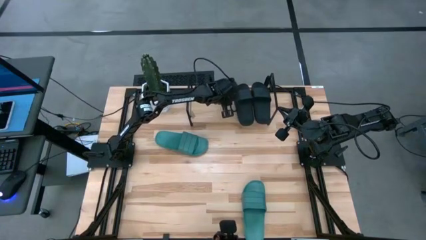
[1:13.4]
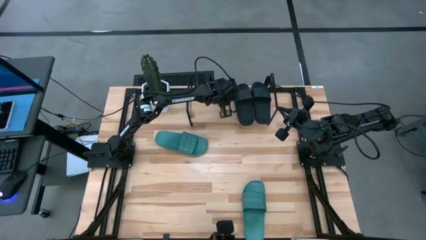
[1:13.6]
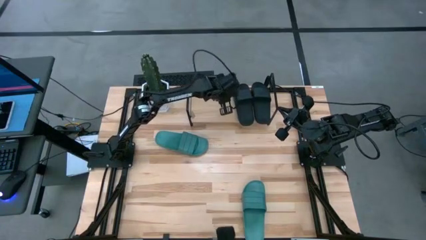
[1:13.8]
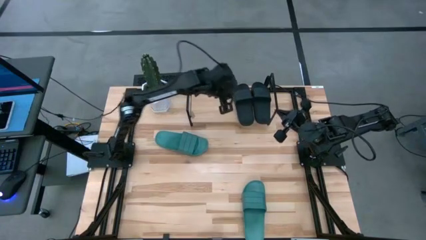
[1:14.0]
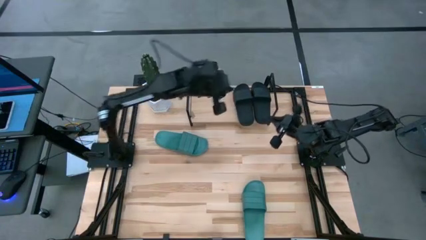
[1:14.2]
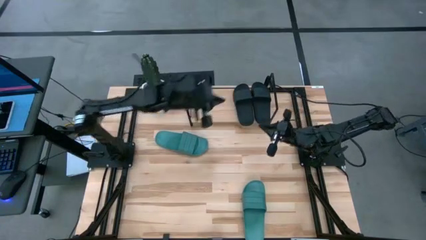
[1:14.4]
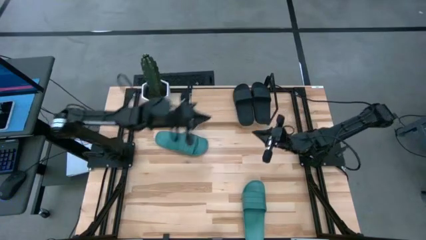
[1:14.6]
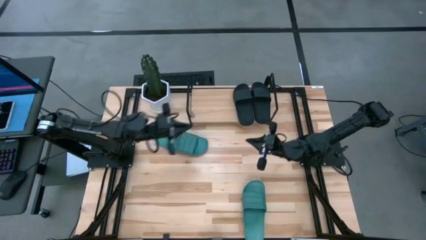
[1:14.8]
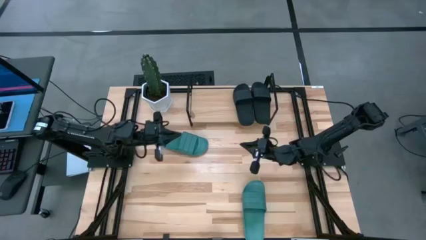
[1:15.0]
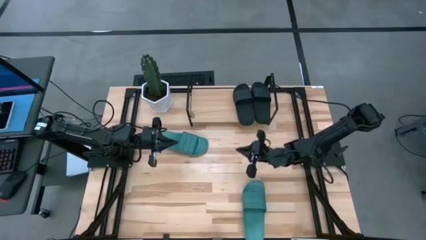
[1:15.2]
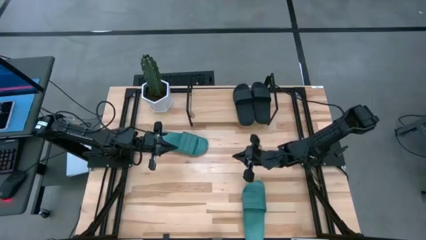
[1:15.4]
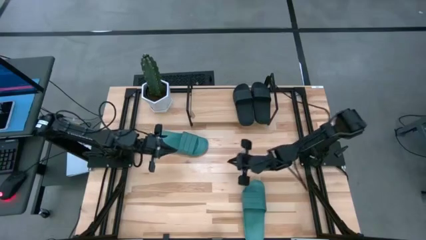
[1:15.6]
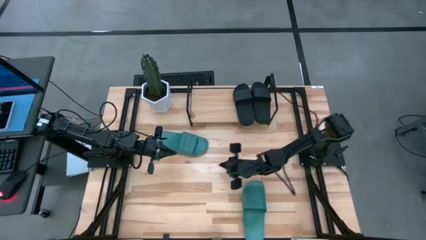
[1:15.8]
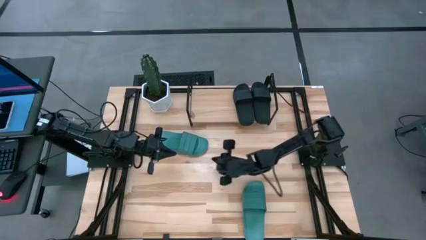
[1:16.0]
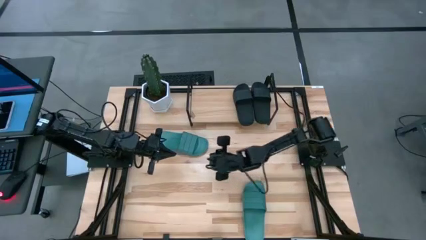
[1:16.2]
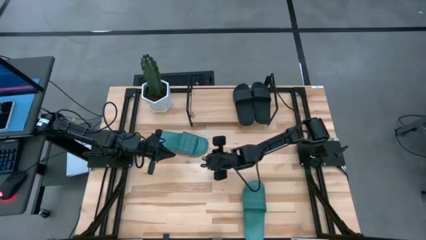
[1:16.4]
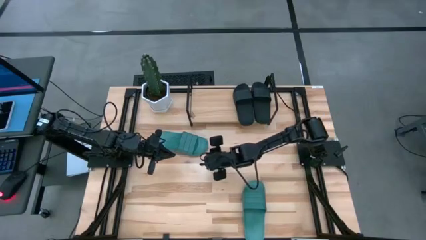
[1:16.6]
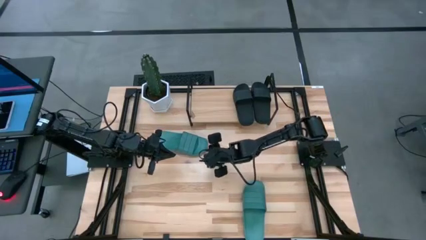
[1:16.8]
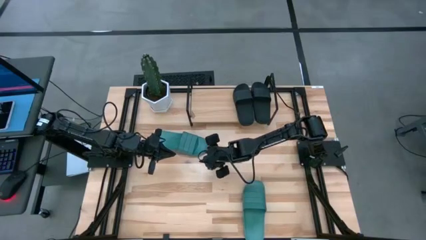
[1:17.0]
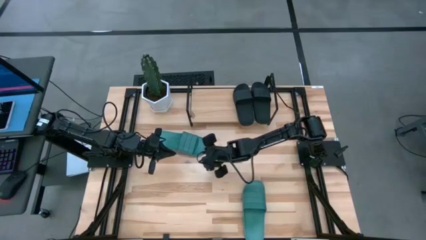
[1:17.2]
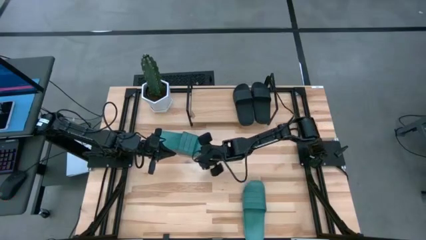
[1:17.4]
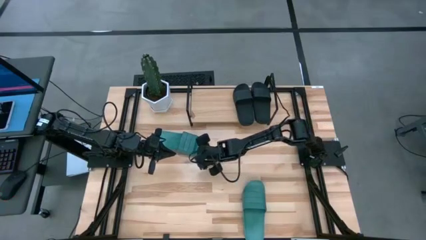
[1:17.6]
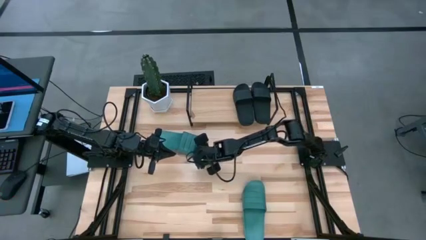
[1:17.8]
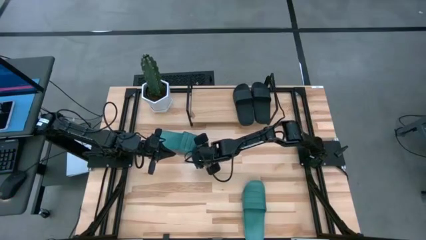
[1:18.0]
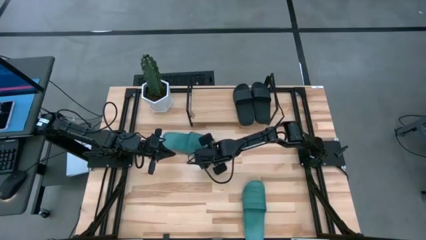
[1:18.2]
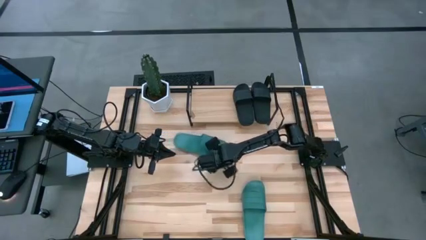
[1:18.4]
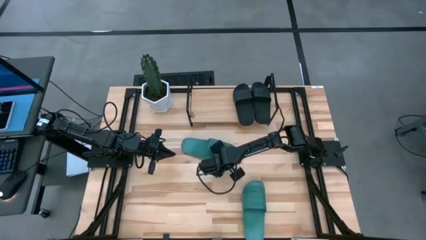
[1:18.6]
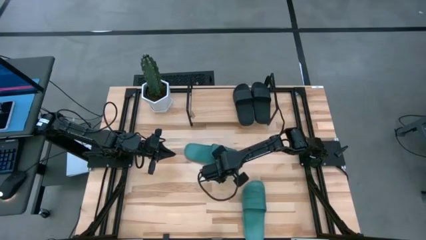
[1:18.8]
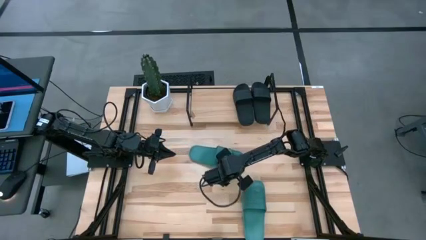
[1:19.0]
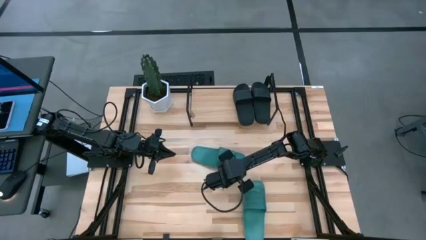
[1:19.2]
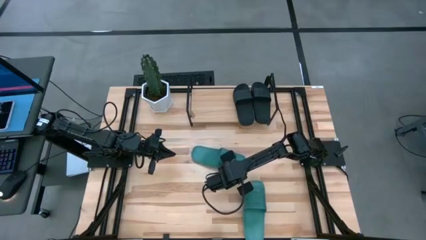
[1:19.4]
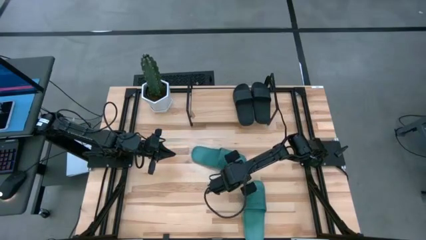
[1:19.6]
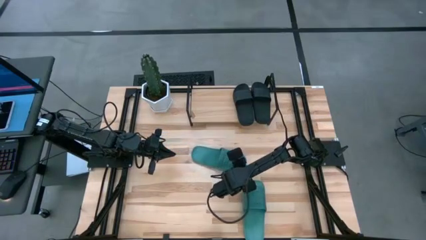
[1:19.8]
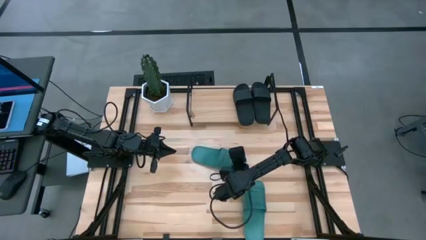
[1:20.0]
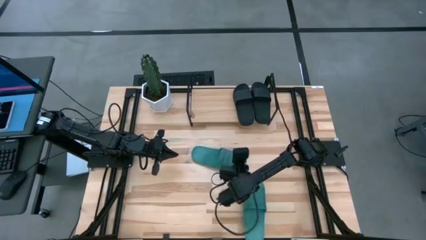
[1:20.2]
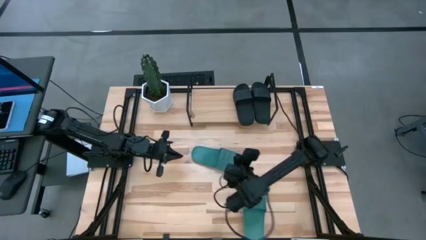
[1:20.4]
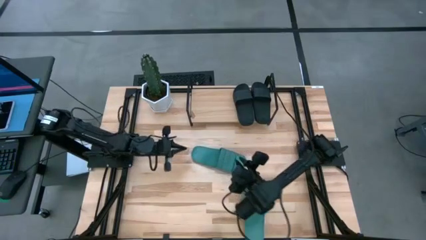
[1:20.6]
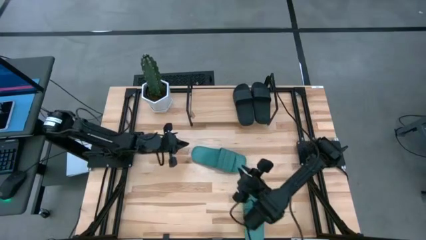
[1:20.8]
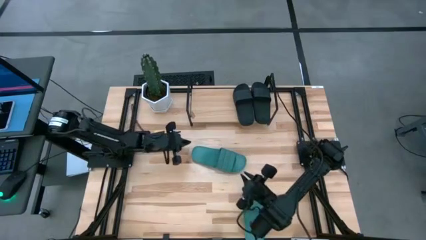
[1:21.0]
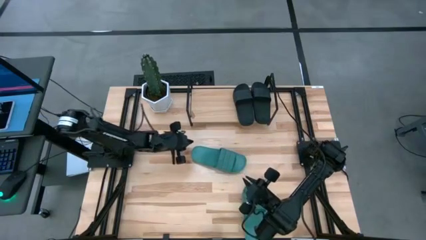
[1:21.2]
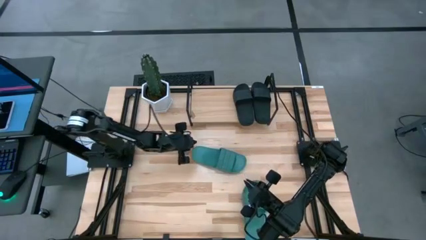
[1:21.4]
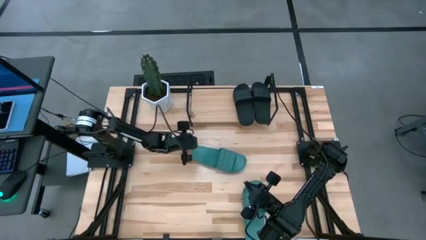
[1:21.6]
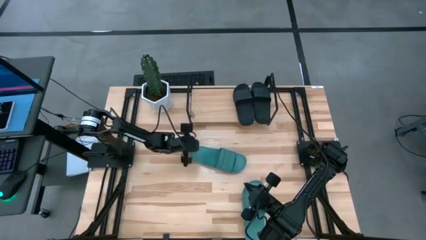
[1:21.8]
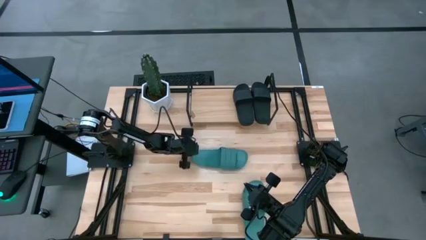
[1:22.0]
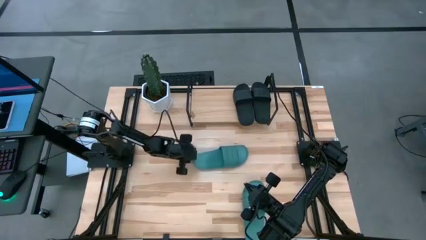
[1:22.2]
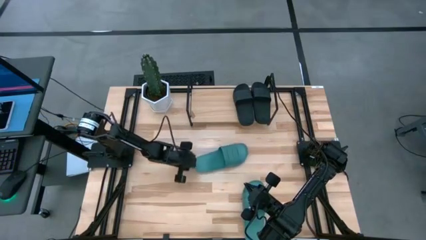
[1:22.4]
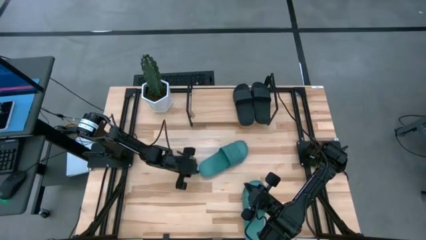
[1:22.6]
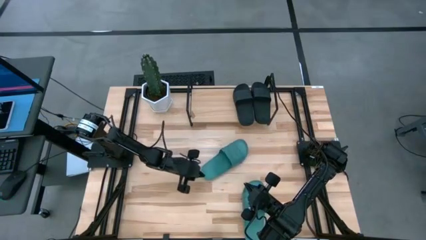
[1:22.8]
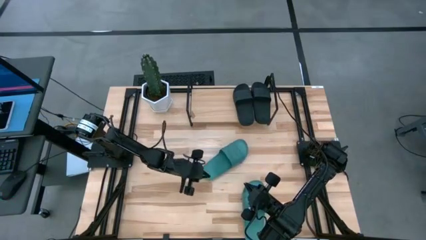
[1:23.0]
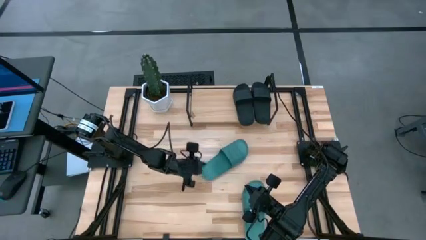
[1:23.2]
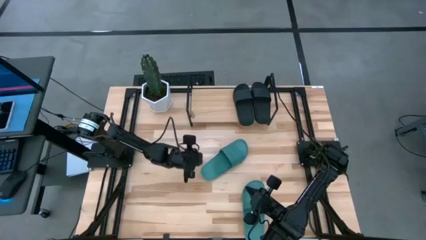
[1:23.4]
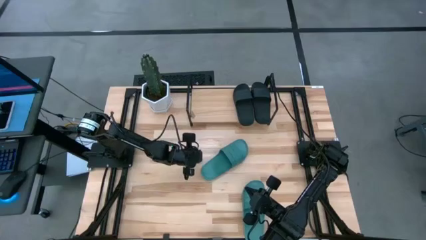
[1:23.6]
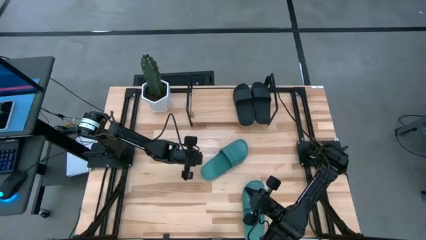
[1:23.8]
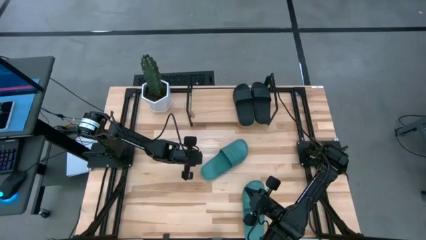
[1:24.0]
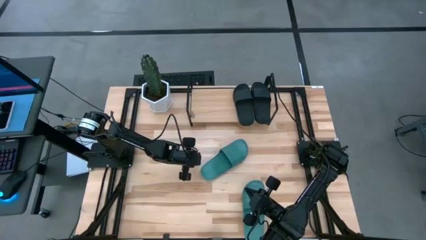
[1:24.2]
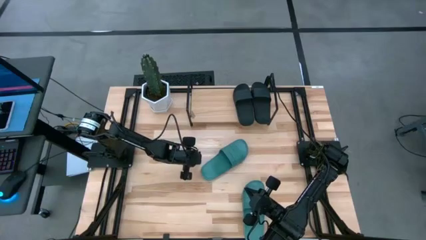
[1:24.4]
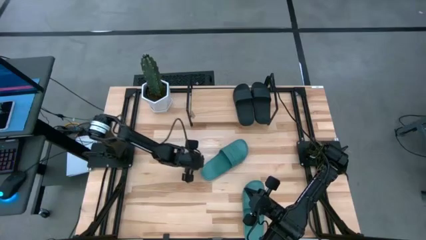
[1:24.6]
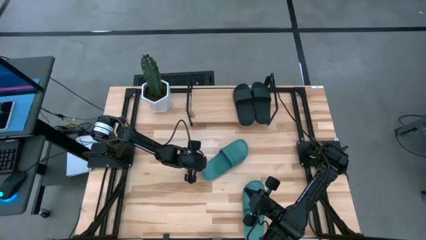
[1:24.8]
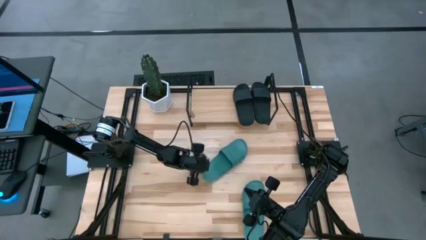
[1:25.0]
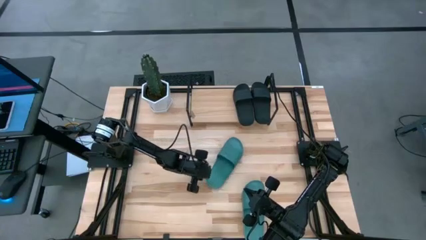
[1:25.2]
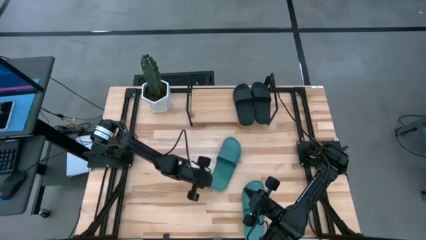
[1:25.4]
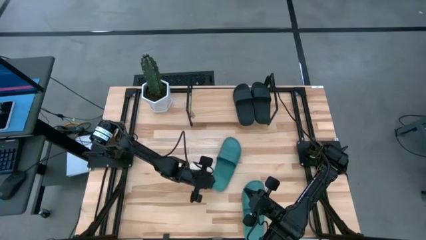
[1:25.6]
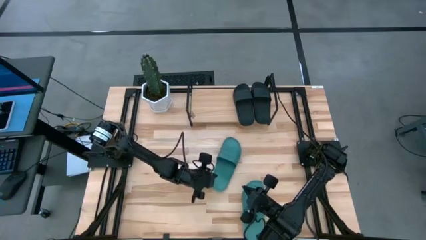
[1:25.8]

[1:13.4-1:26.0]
Task: Pick and place slides into the shelf
Put the top green slide on the shelf
